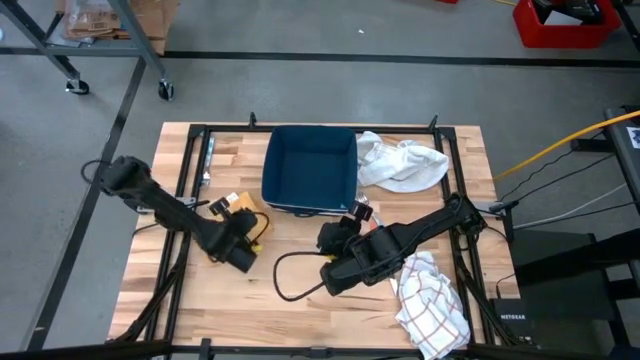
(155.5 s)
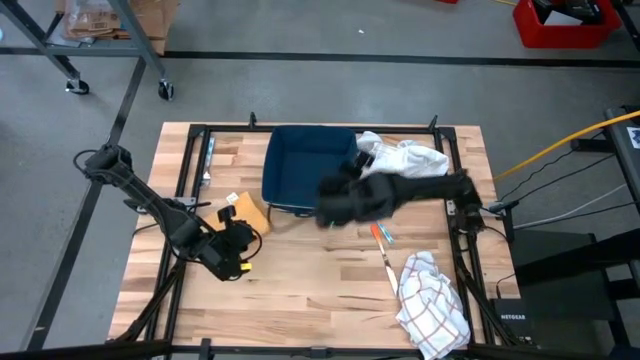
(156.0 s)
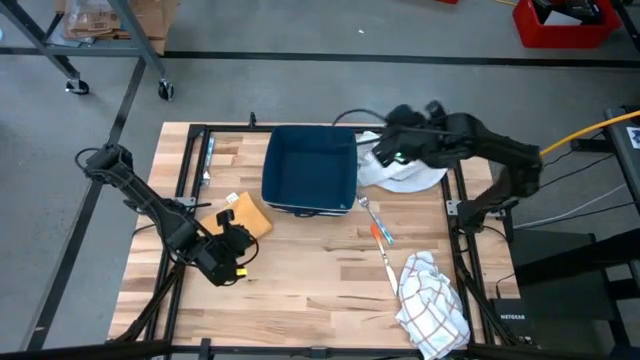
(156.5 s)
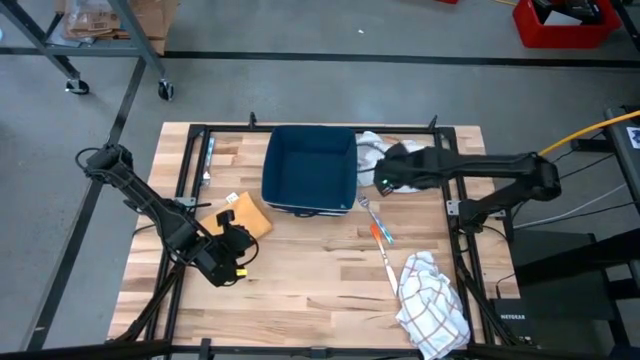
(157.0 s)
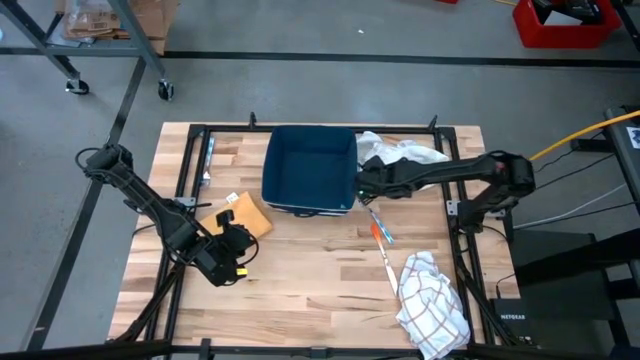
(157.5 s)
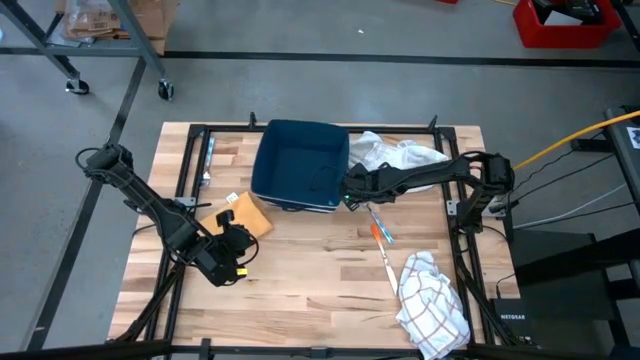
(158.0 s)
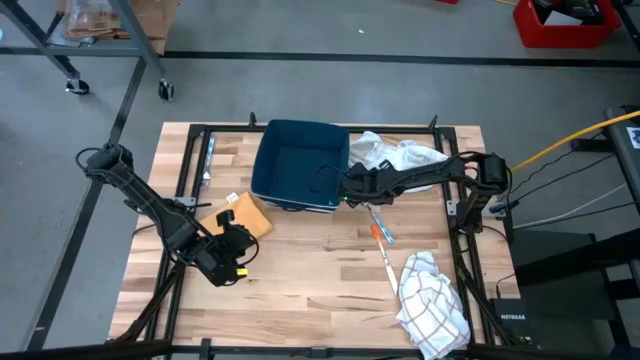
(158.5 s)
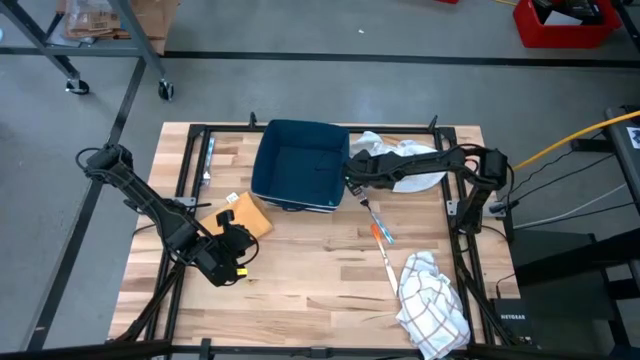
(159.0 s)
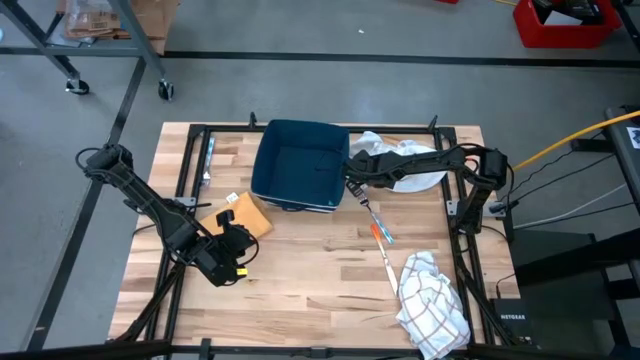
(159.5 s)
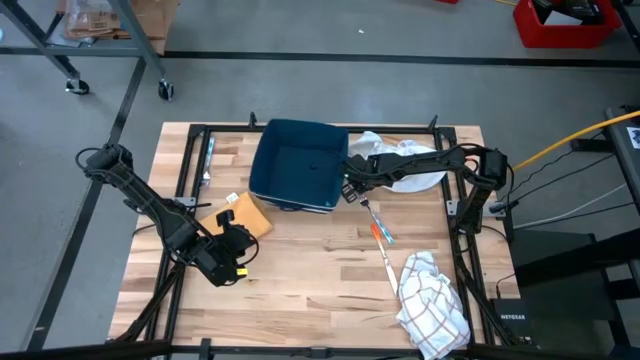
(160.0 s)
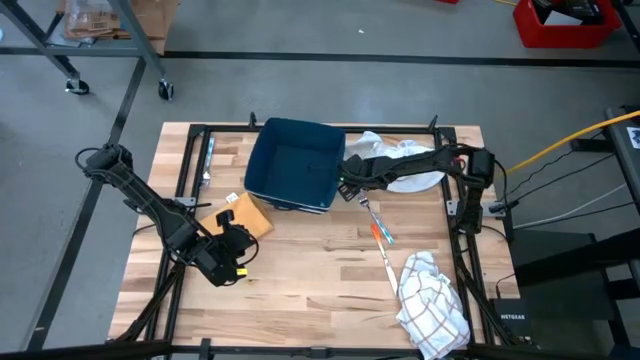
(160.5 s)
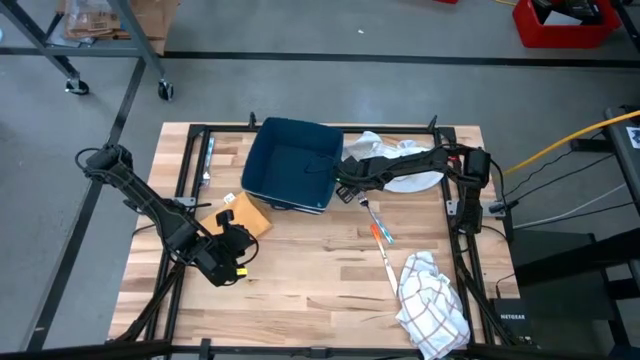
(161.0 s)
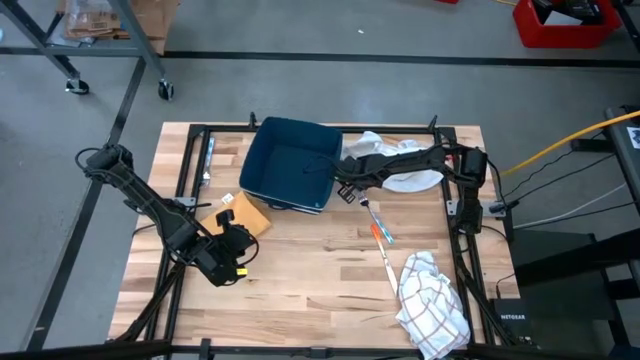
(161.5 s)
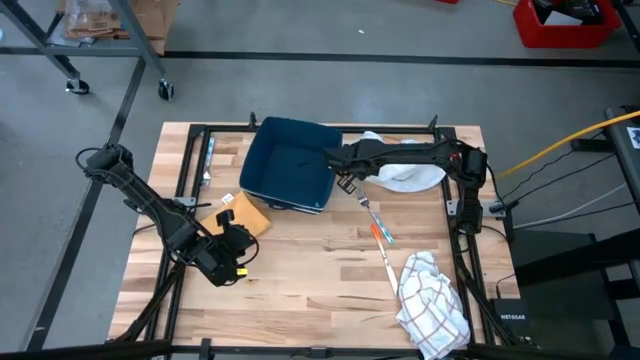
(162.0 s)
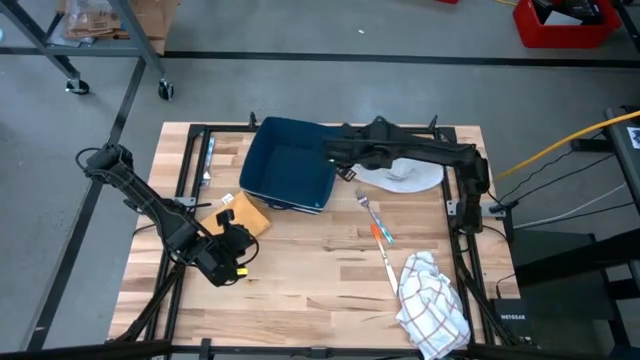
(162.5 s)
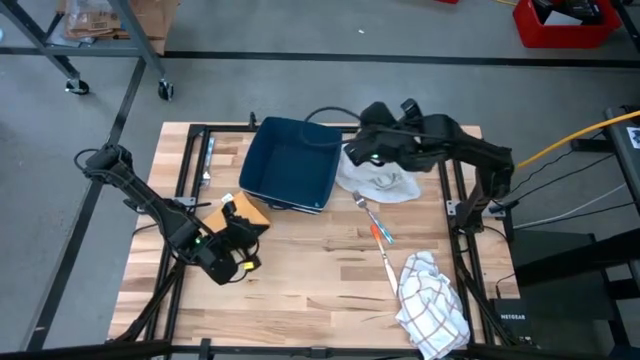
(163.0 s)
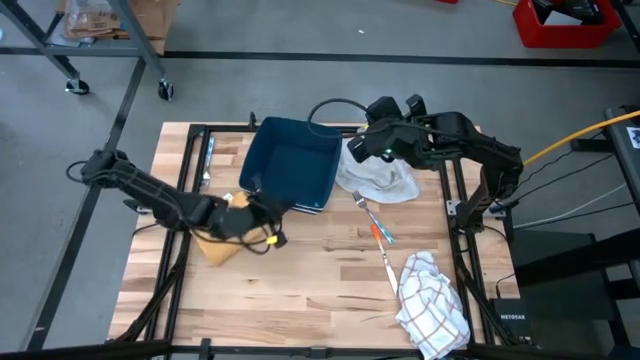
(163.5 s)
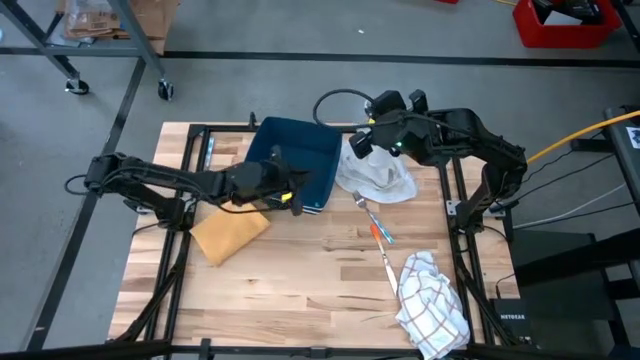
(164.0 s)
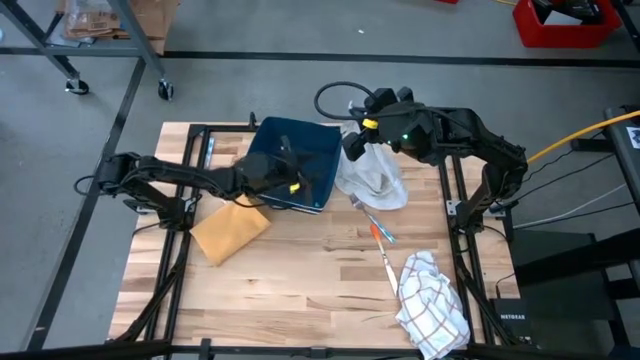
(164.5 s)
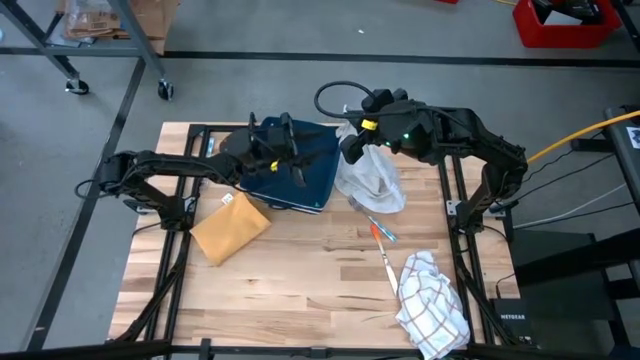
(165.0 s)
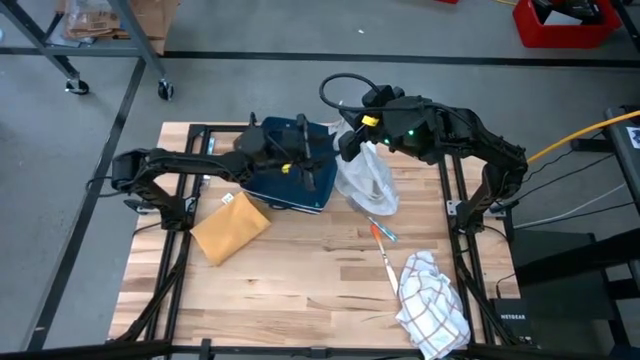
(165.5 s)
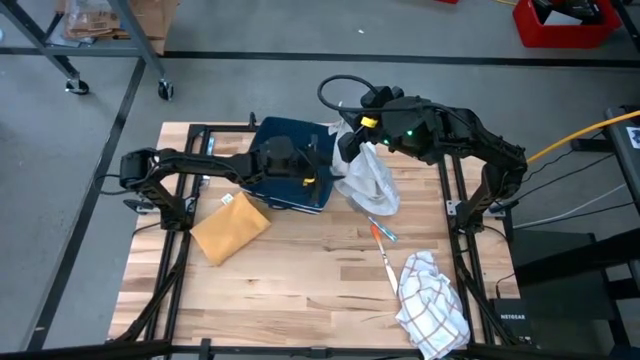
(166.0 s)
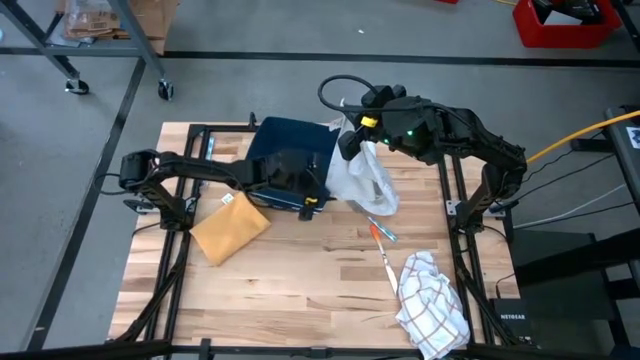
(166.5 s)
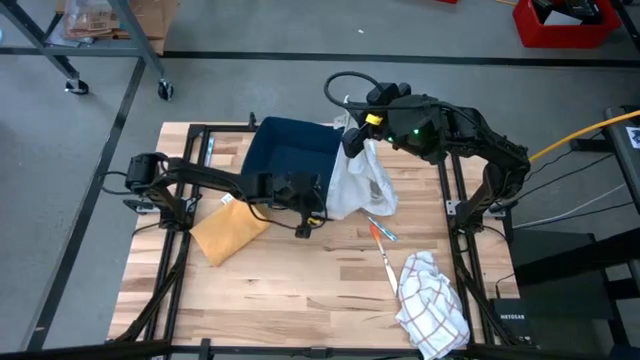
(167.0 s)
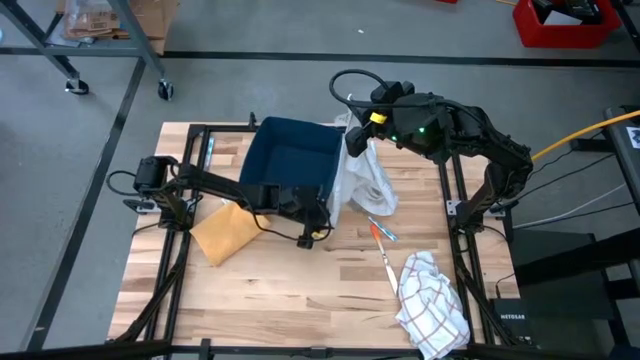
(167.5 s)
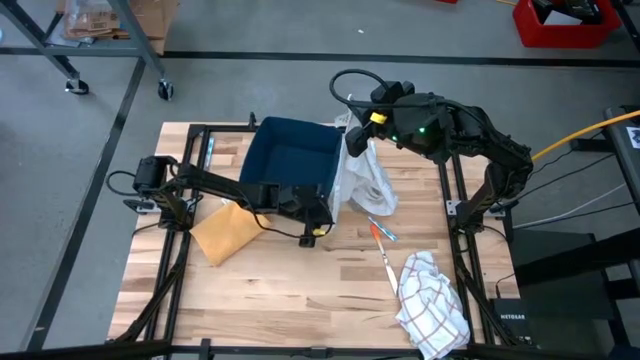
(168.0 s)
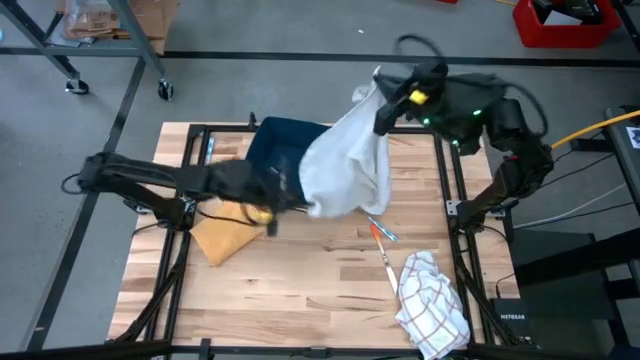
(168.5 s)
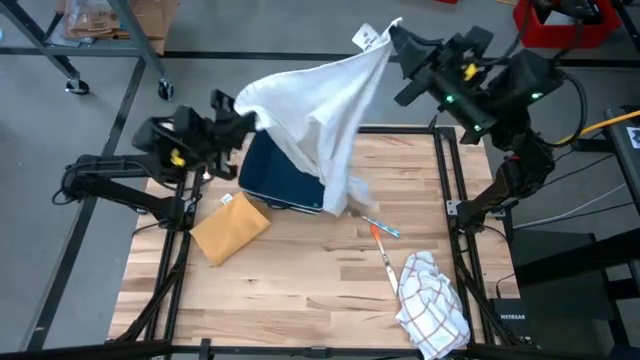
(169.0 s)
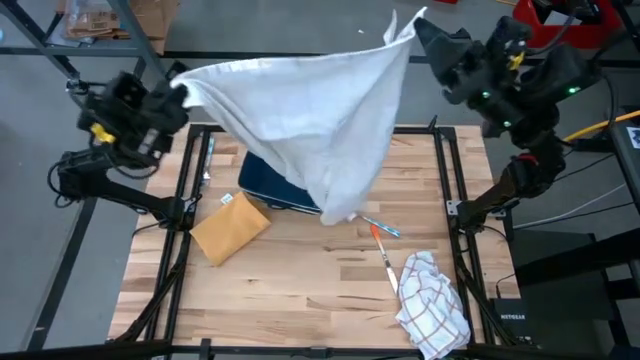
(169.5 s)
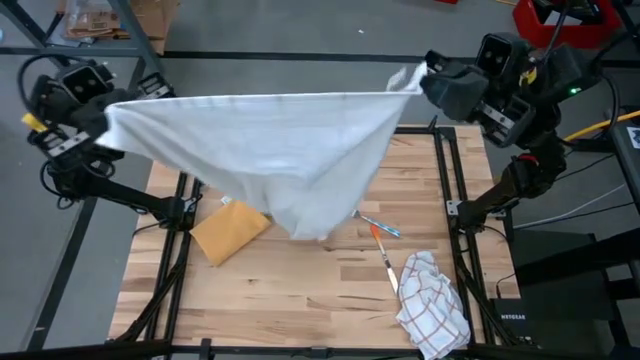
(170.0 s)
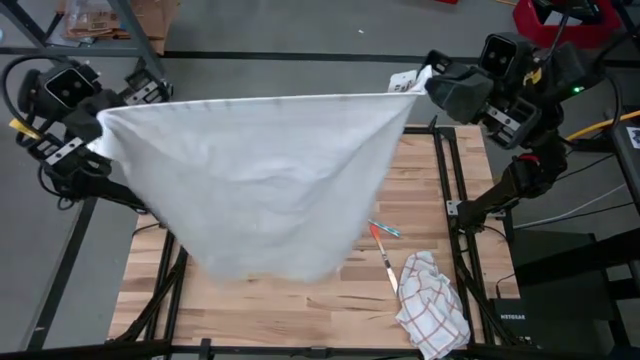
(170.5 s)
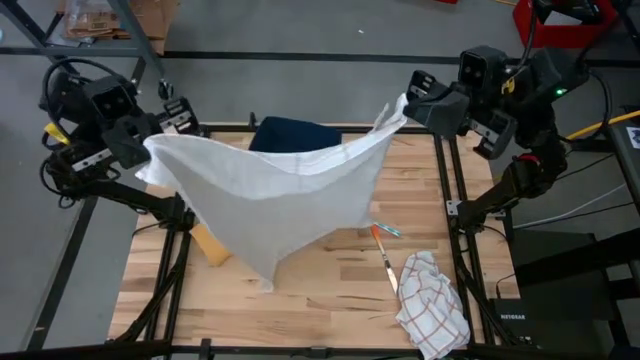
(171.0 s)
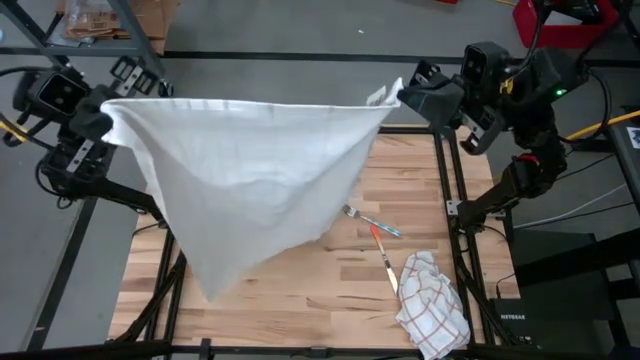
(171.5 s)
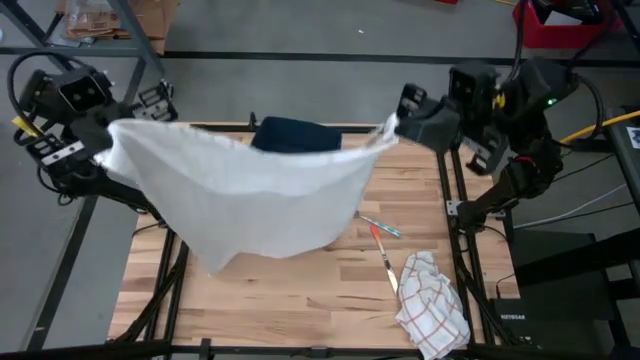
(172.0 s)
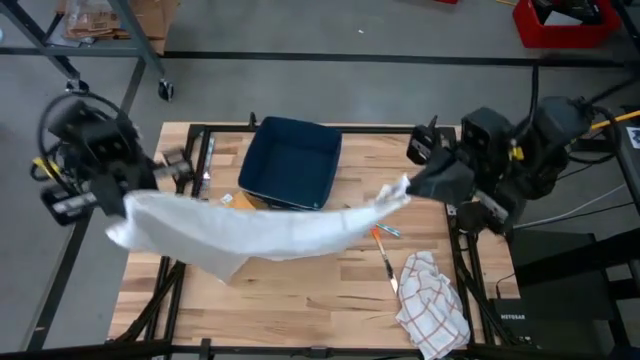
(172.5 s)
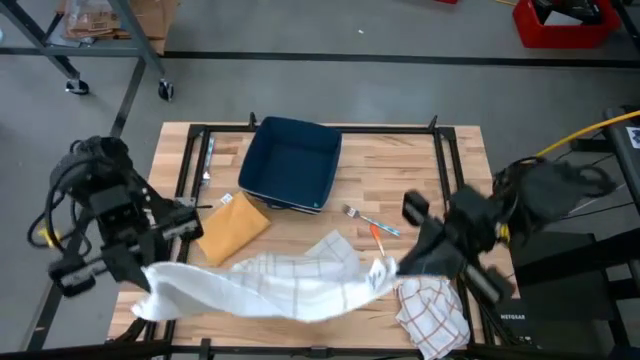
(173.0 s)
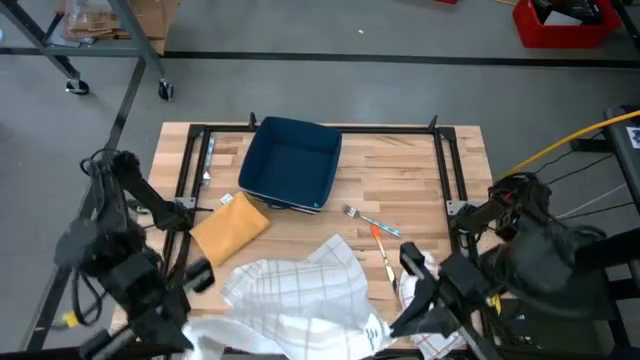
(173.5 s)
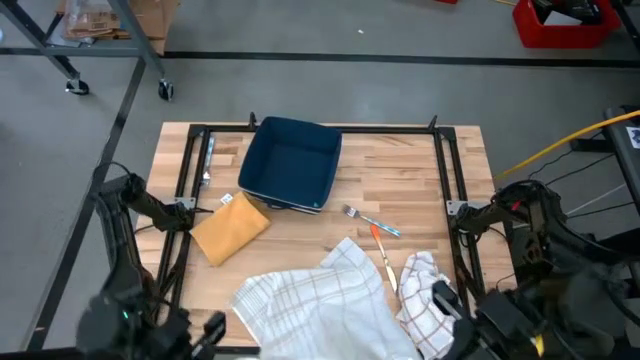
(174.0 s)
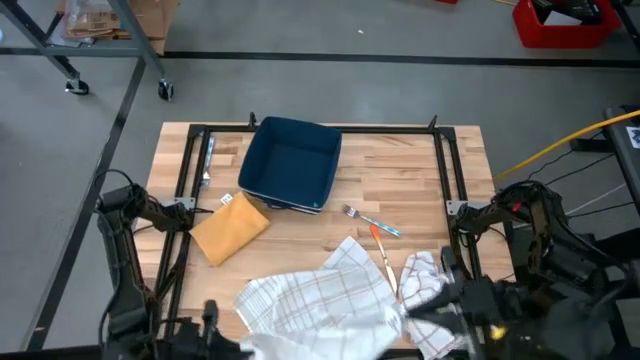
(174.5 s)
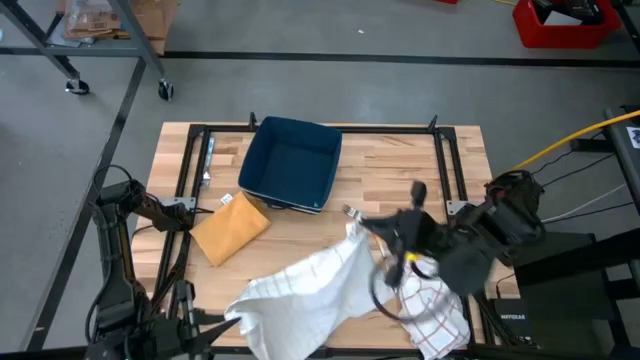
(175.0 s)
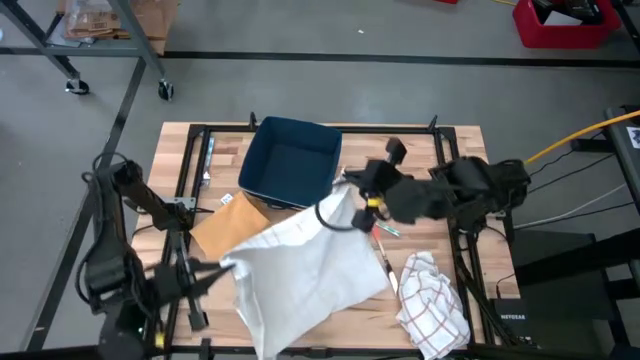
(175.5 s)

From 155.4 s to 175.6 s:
Task: Fold towel
Fold the top white patterned towel

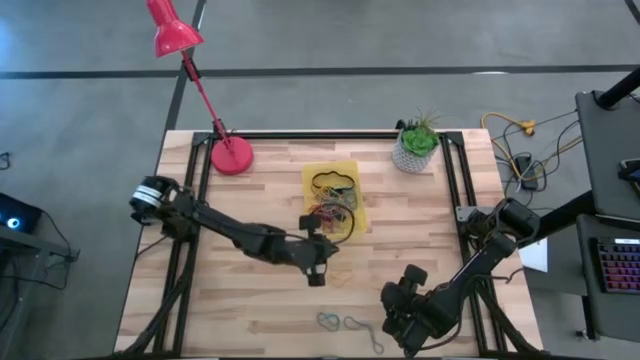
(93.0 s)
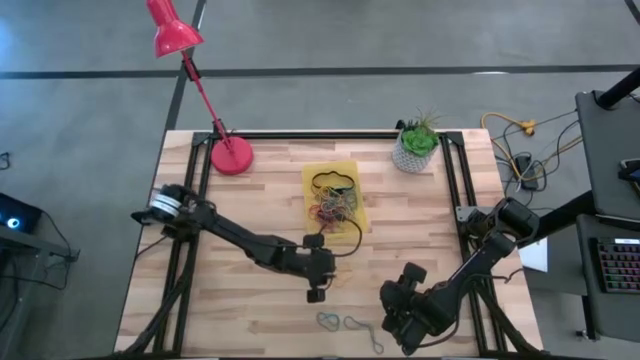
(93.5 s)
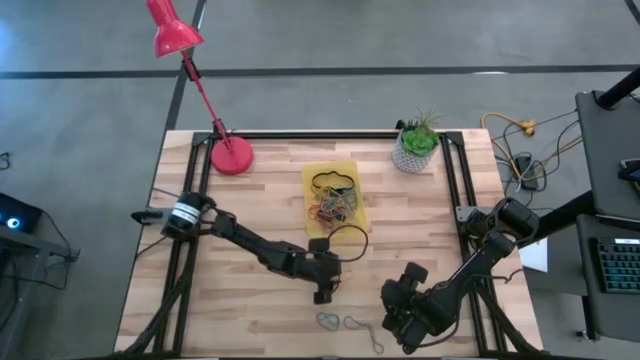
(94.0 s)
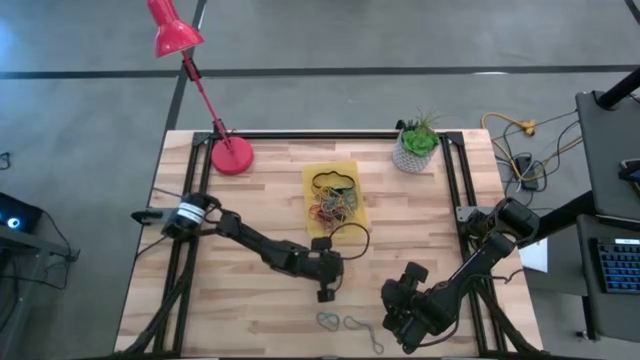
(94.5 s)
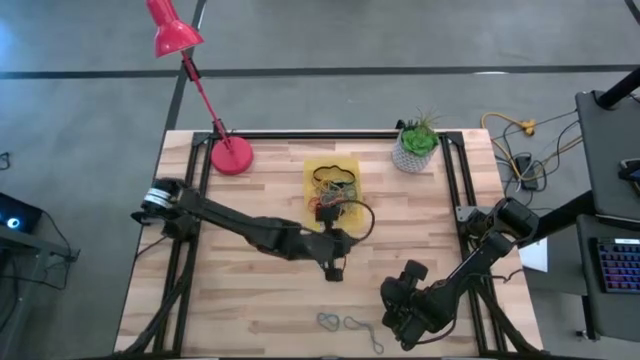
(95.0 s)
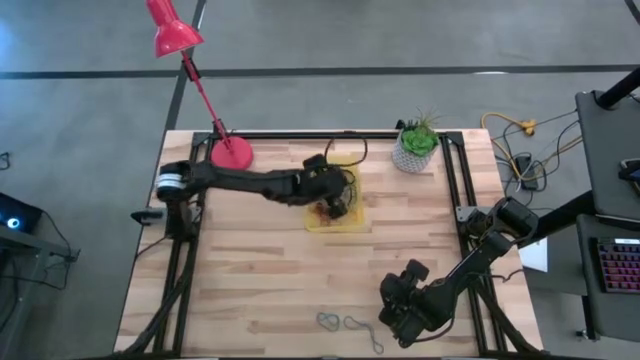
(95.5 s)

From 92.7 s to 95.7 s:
Task: Pick and place rubber bands into bin
Put the yellow rubber band into the yellow bin
